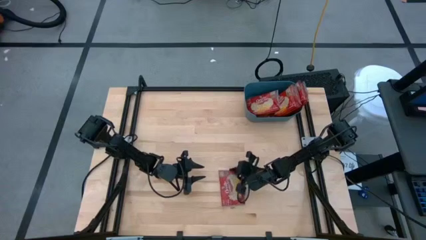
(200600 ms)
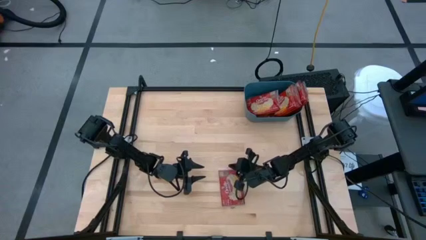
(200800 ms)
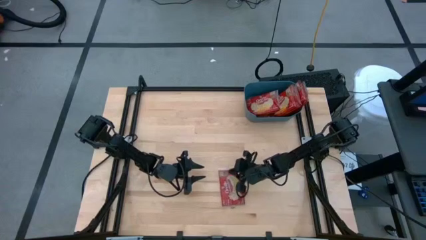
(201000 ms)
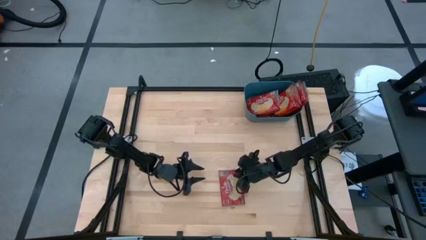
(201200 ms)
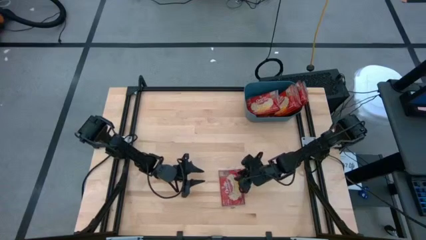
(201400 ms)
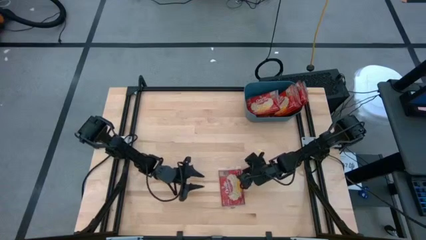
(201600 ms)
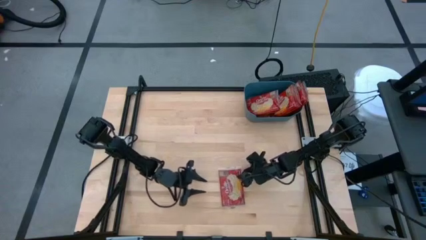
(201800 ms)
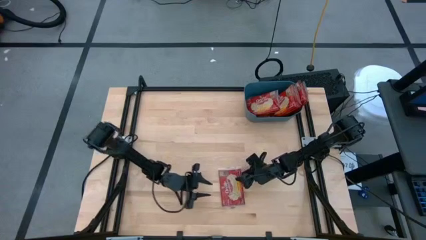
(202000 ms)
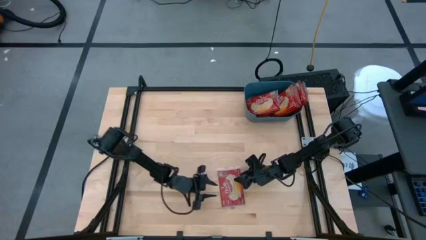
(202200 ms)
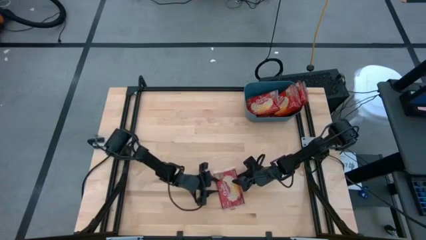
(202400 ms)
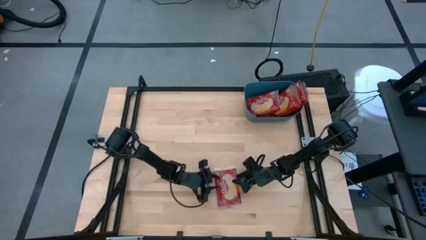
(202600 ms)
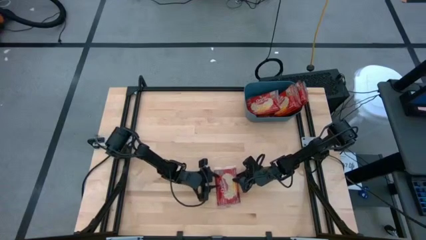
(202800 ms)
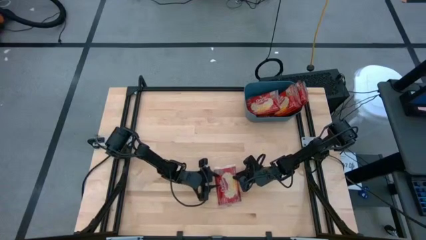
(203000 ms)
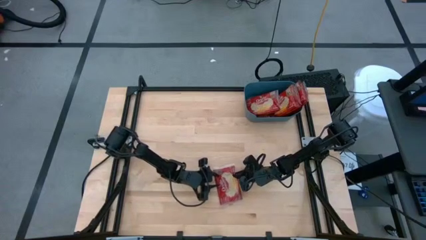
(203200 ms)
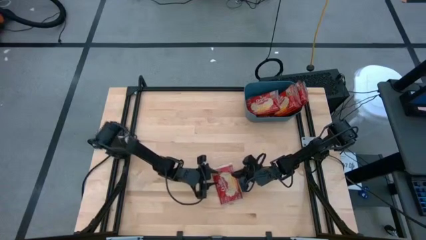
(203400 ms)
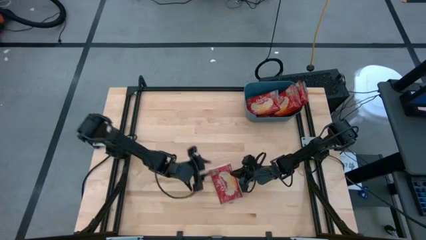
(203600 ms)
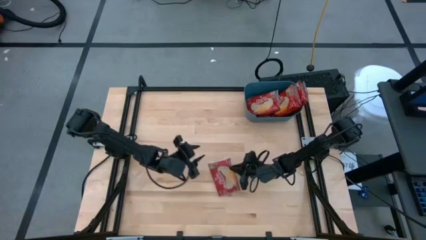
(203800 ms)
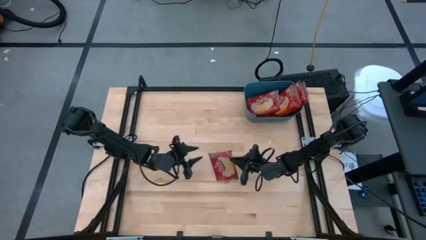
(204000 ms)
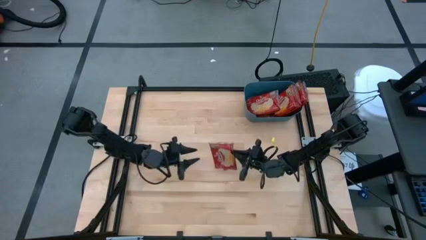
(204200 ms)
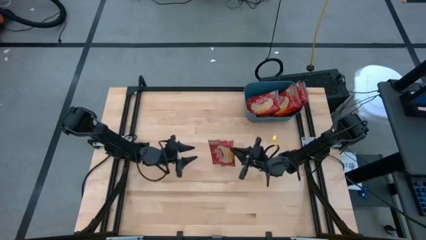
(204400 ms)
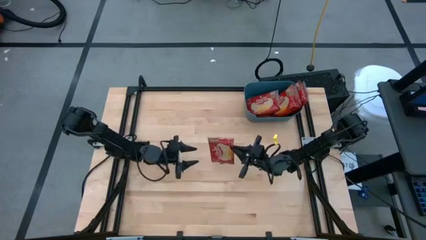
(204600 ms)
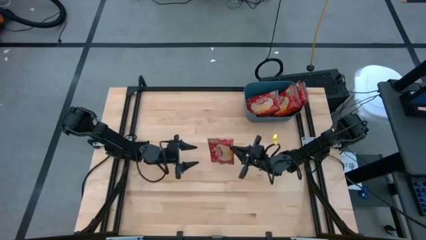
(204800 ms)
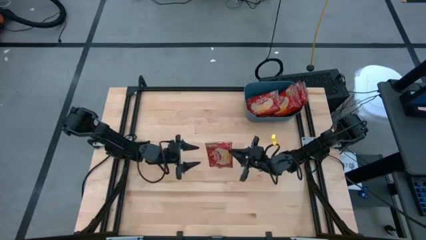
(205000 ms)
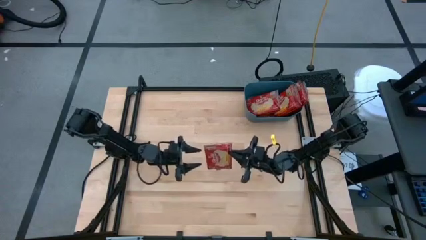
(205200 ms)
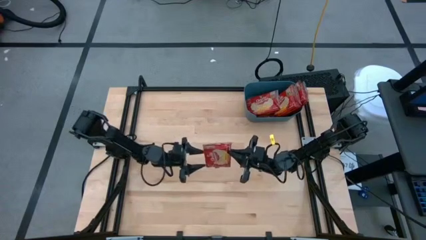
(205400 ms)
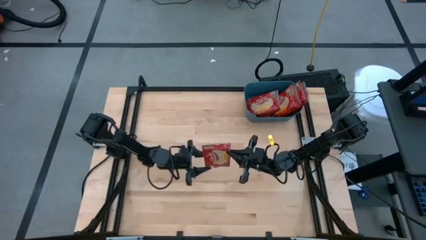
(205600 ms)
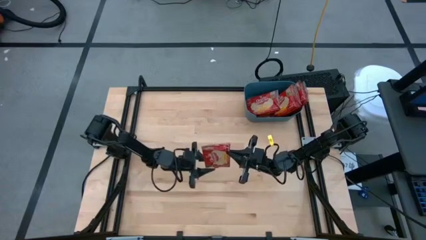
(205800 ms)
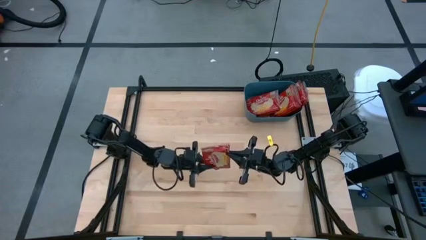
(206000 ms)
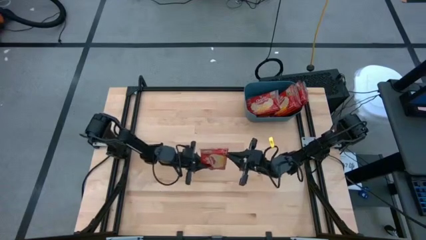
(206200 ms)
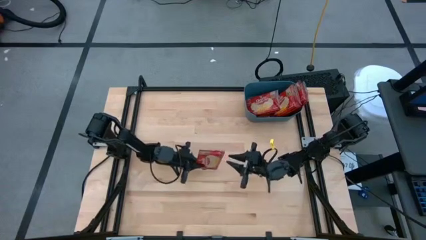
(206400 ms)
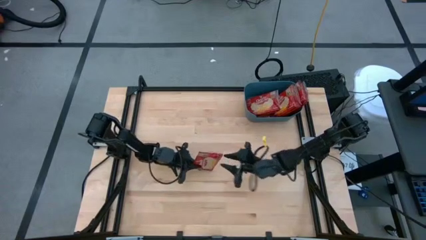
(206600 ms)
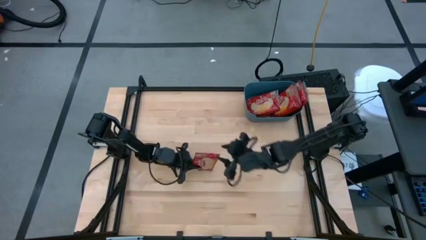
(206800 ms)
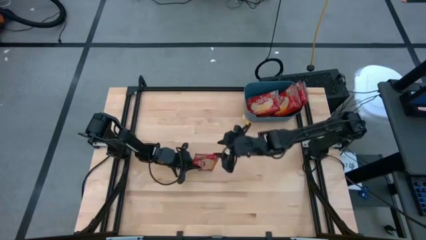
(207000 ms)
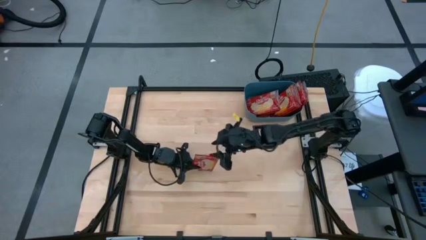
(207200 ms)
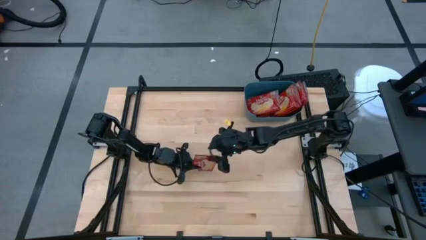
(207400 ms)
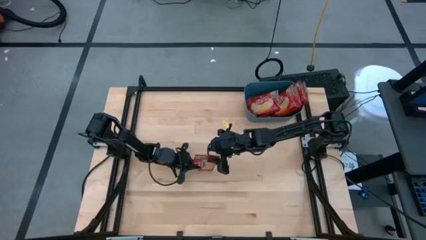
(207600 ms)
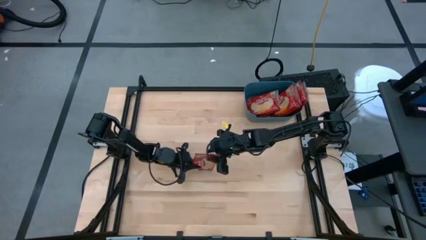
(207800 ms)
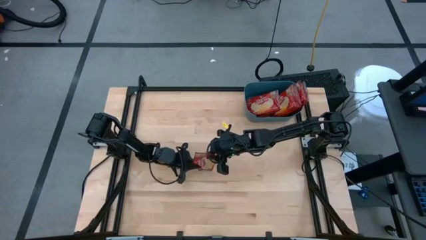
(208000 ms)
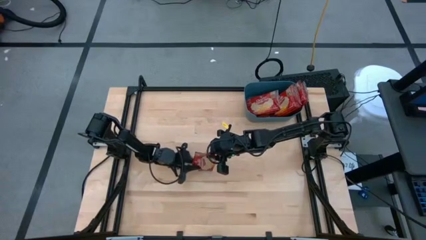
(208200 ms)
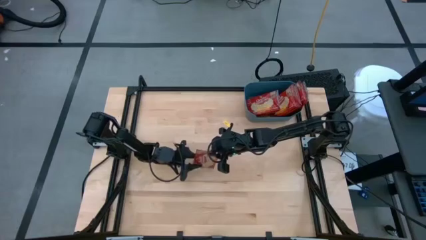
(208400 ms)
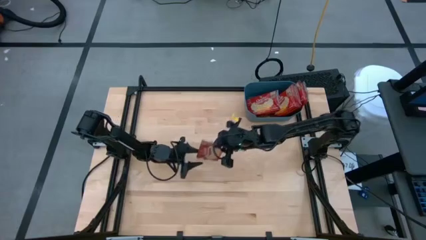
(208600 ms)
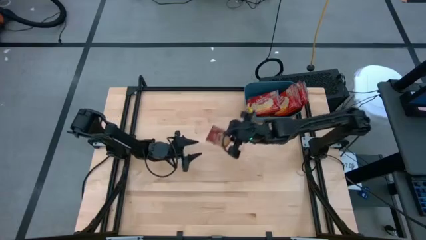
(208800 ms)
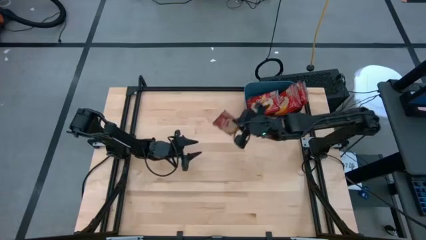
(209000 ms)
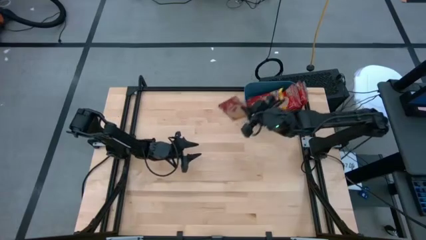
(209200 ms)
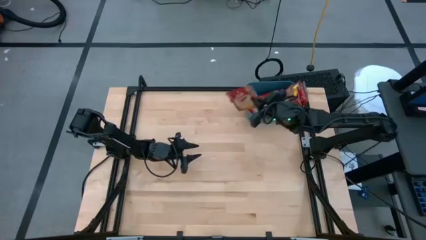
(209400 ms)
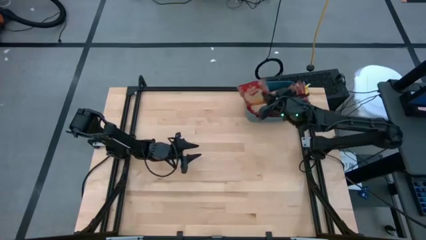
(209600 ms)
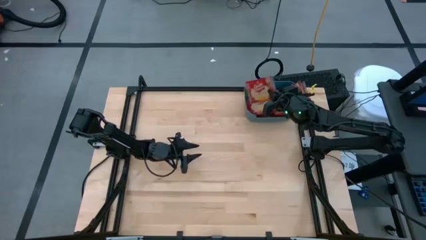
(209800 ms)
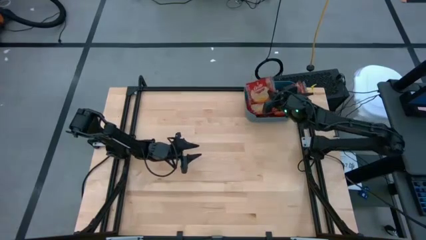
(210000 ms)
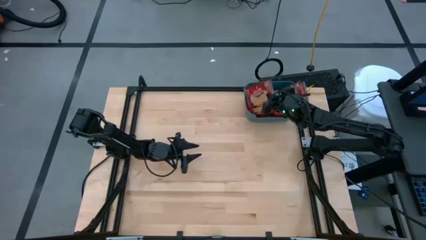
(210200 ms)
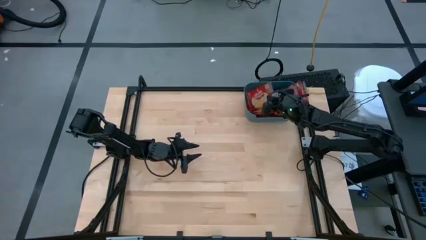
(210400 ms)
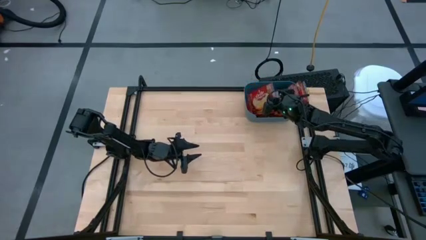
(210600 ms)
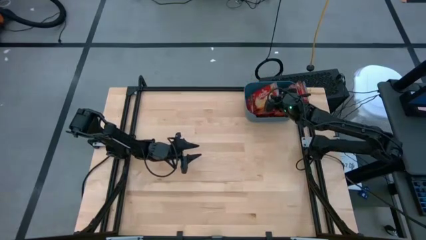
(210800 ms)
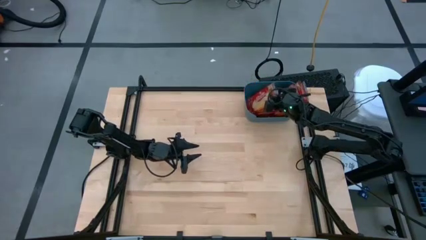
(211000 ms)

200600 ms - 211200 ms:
Task: Sort popcorn bags into baskets
Put the popcorn bag into the blue bin

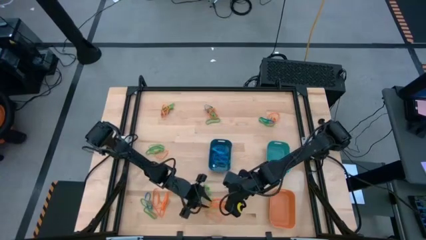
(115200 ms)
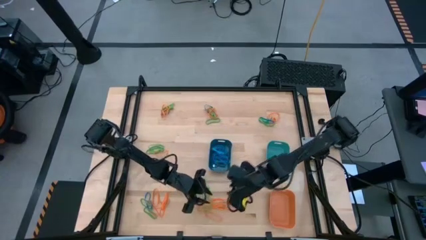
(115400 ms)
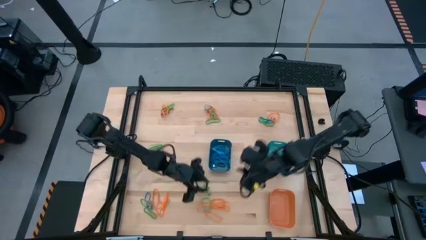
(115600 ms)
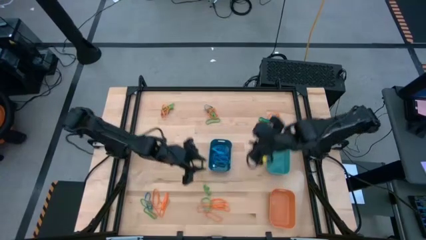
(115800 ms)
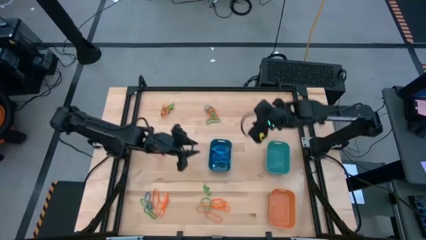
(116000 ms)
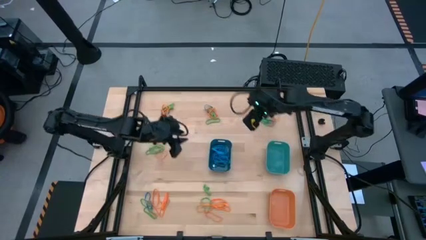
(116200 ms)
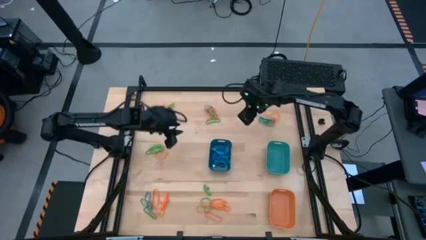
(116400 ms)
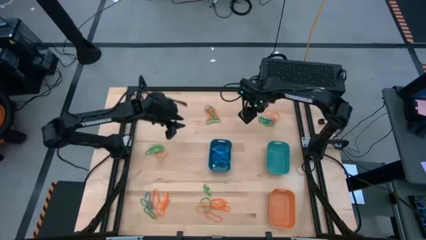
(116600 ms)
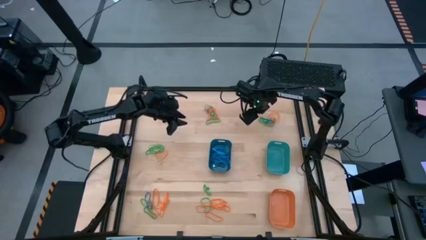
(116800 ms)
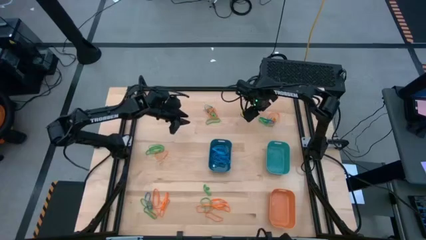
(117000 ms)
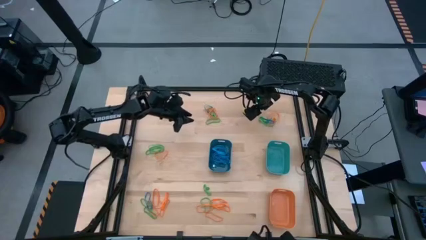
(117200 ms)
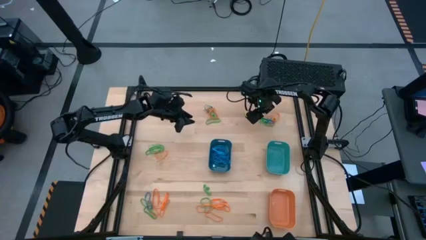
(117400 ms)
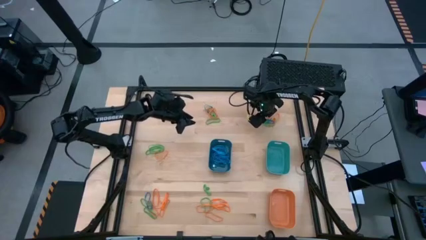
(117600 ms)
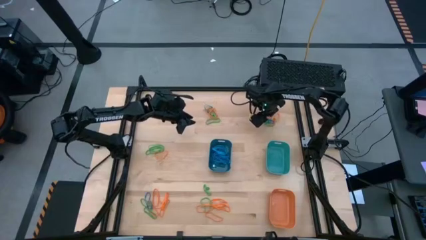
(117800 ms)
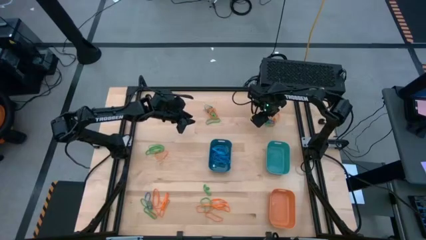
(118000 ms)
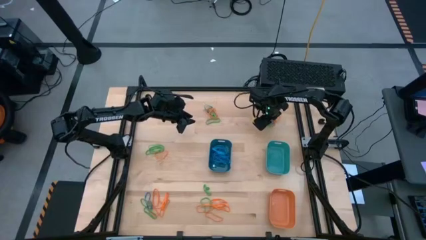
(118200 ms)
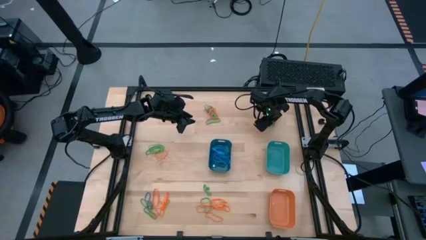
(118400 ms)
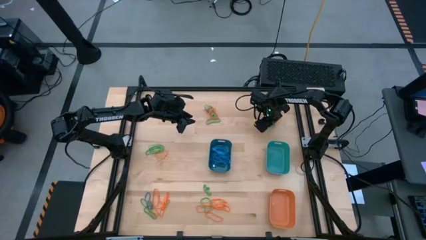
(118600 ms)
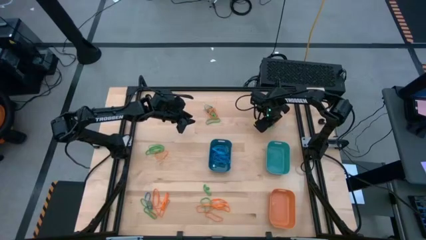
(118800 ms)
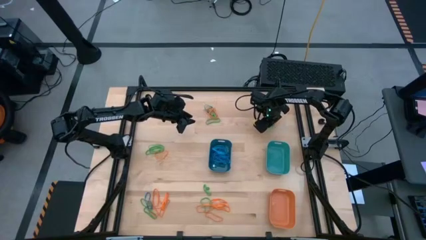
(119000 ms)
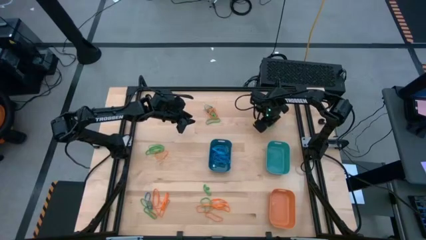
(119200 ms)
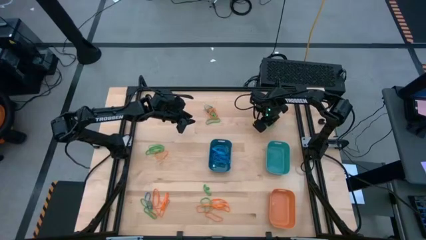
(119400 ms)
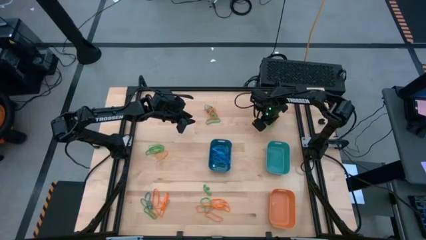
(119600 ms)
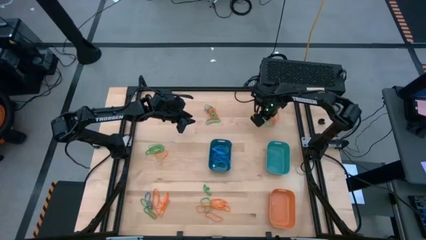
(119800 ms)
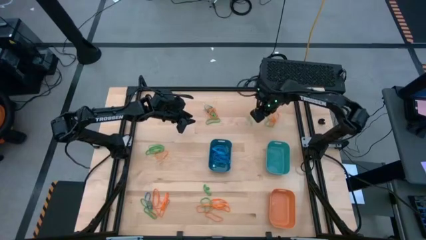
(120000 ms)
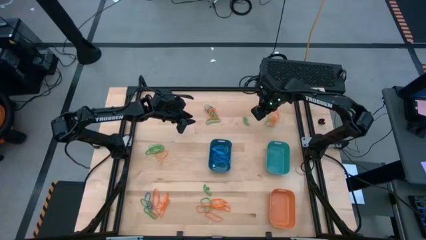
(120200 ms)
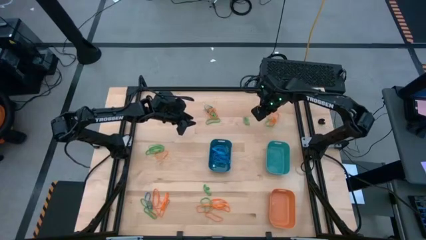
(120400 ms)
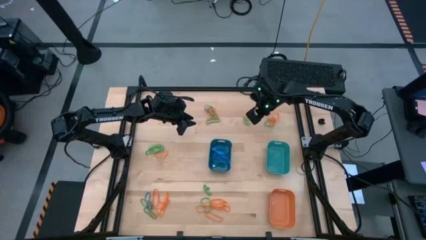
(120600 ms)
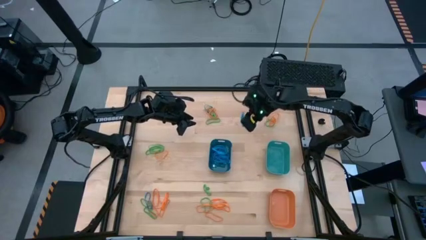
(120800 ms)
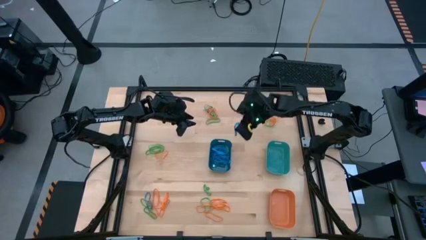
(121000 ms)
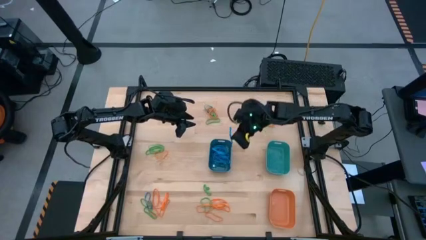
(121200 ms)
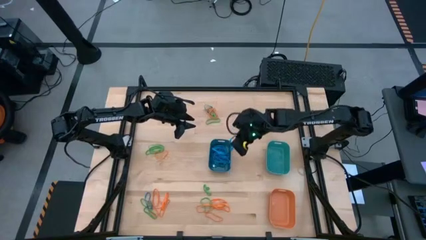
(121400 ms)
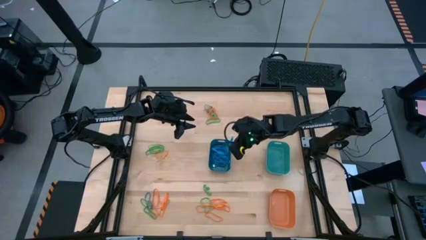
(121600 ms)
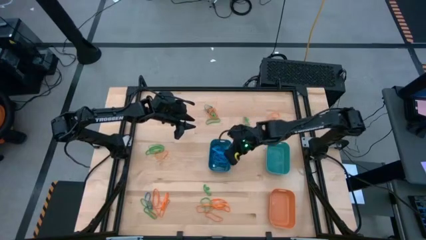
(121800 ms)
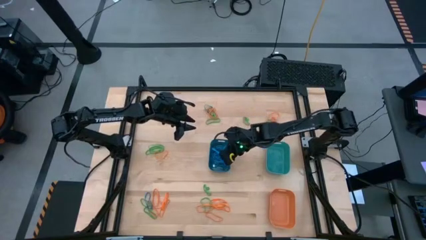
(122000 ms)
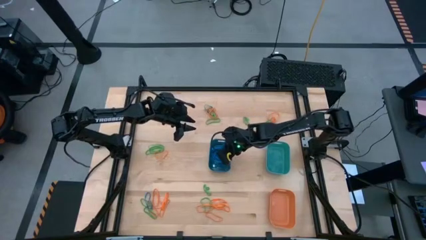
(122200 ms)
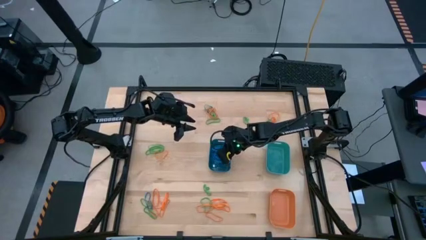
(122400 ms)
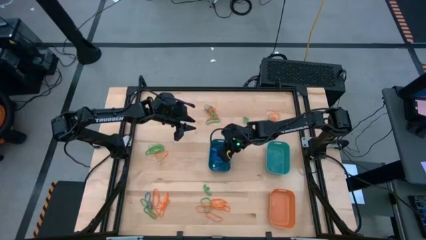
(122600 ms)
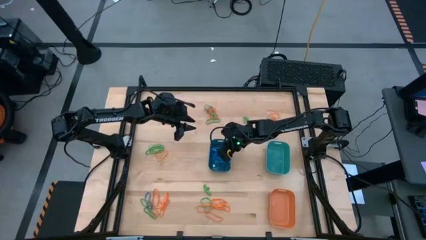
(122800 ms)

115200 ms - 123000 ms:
Task: Sort rubber bands into baskets
Put the blue rubberband into the blue bin
